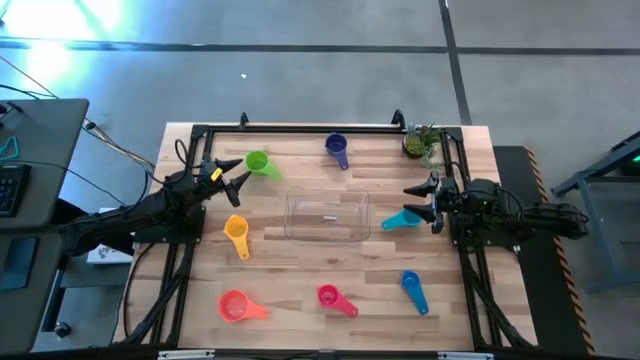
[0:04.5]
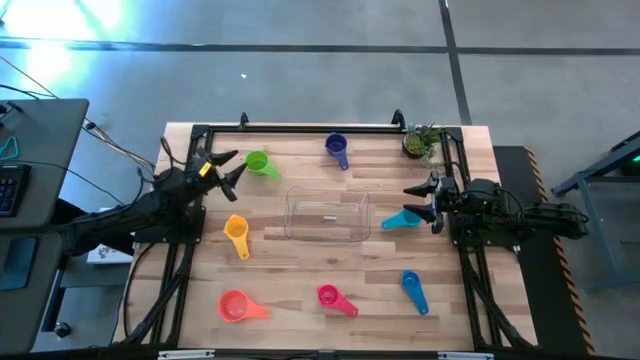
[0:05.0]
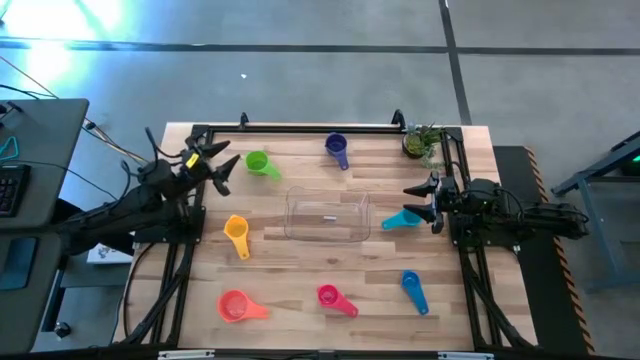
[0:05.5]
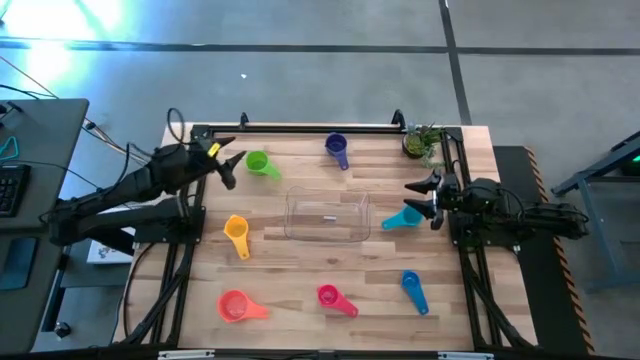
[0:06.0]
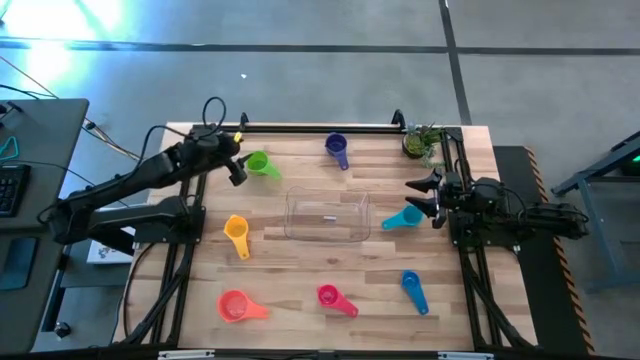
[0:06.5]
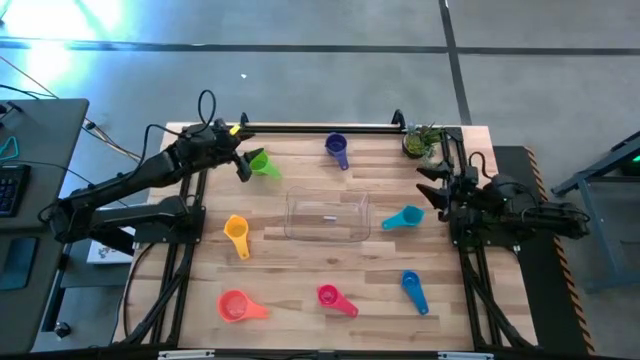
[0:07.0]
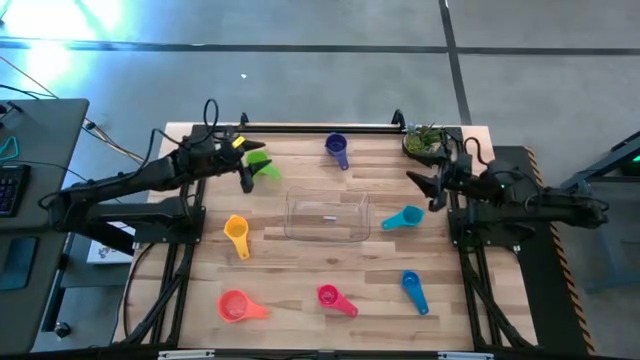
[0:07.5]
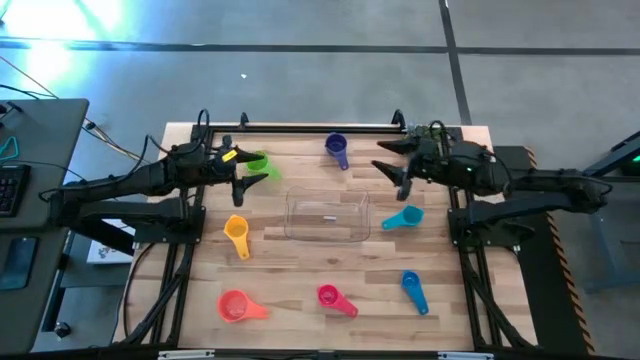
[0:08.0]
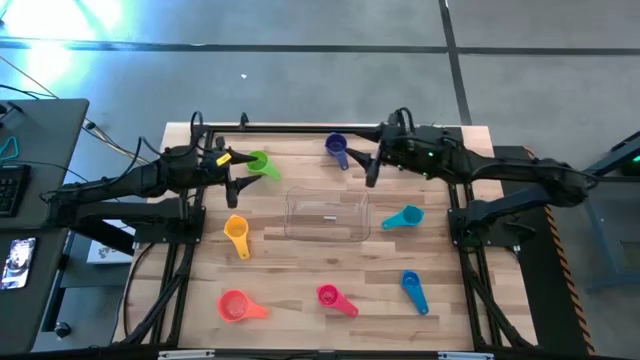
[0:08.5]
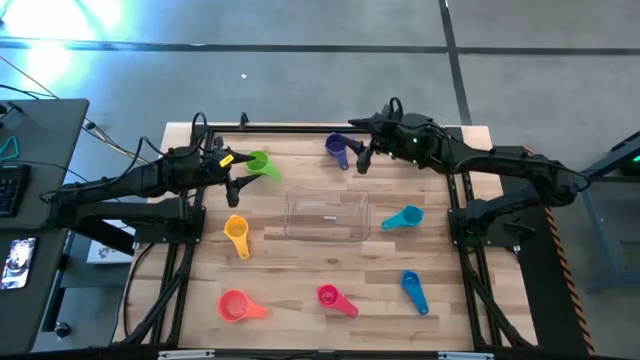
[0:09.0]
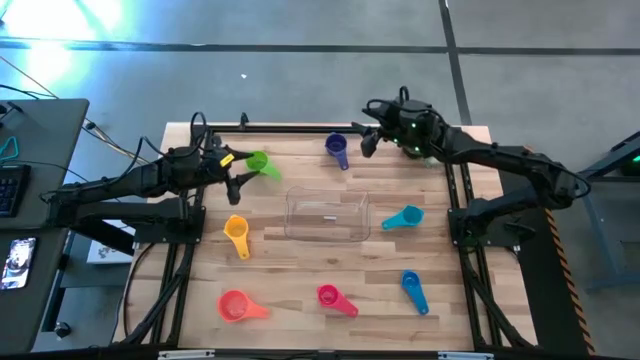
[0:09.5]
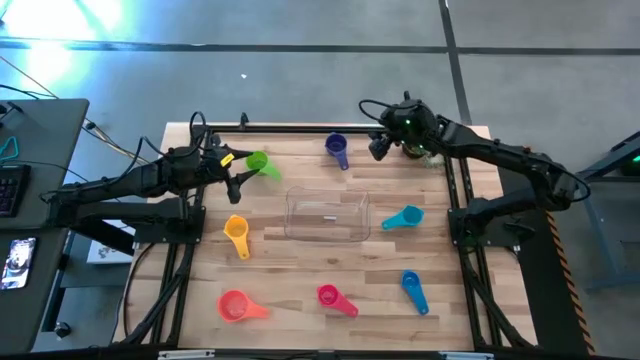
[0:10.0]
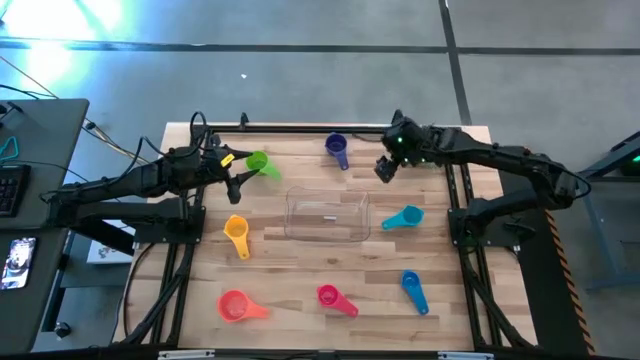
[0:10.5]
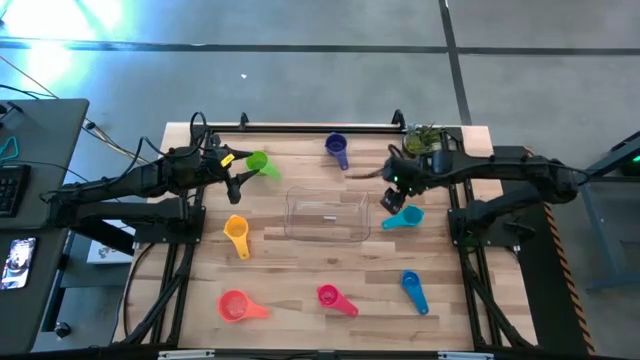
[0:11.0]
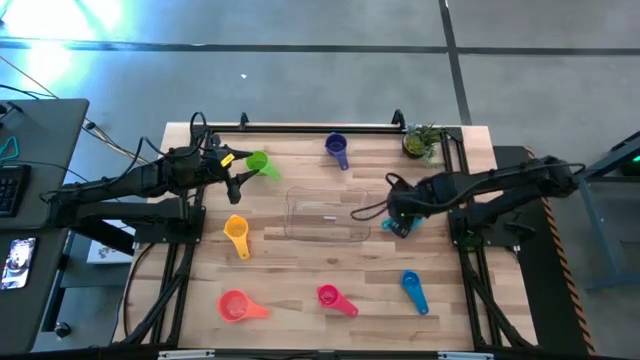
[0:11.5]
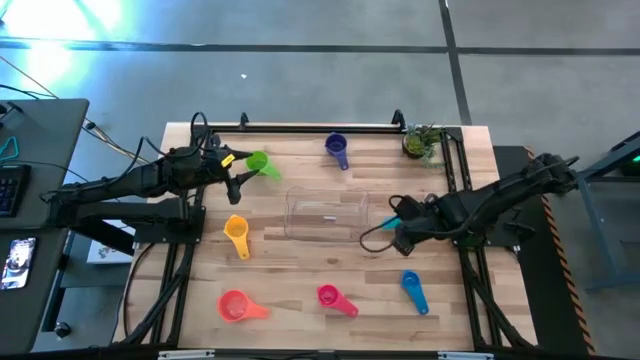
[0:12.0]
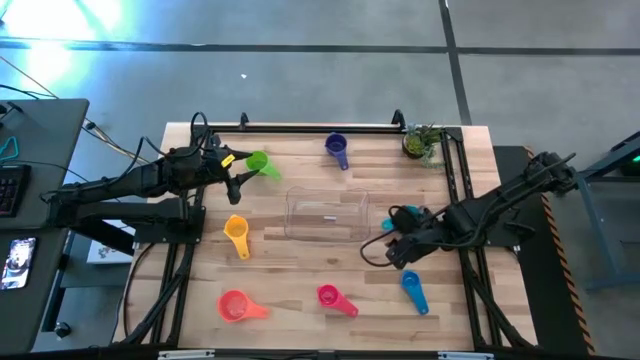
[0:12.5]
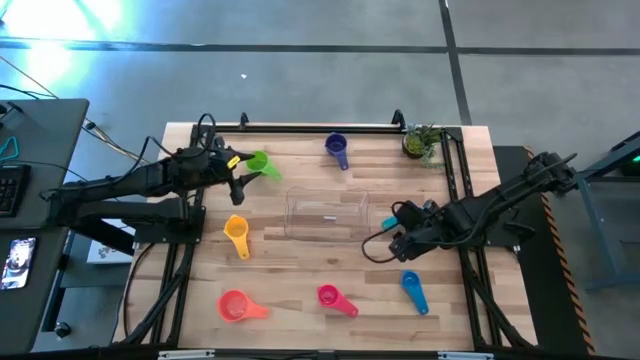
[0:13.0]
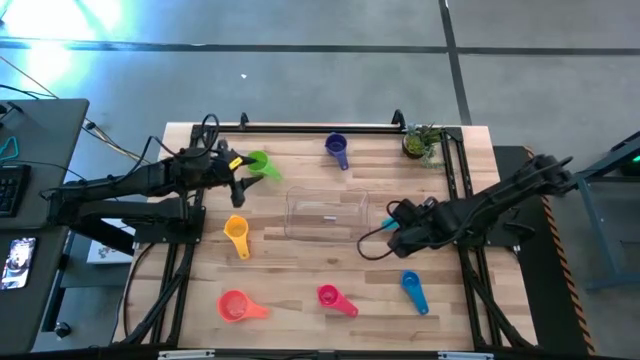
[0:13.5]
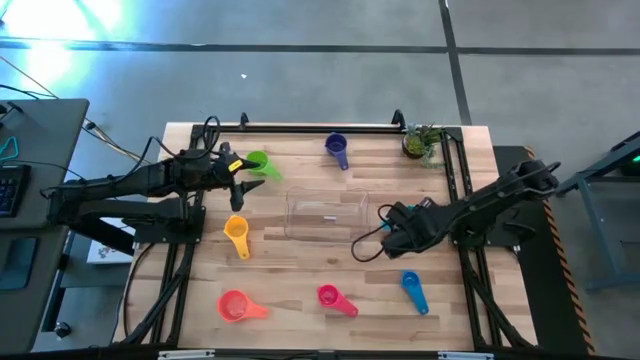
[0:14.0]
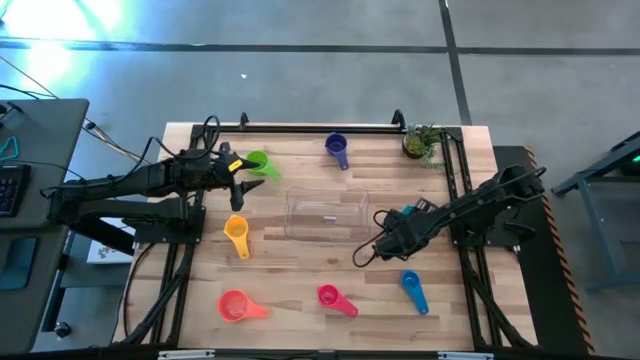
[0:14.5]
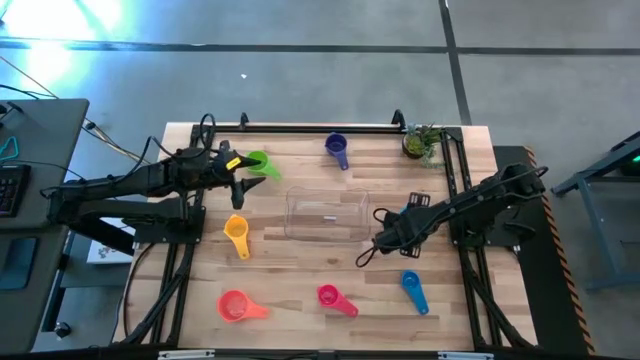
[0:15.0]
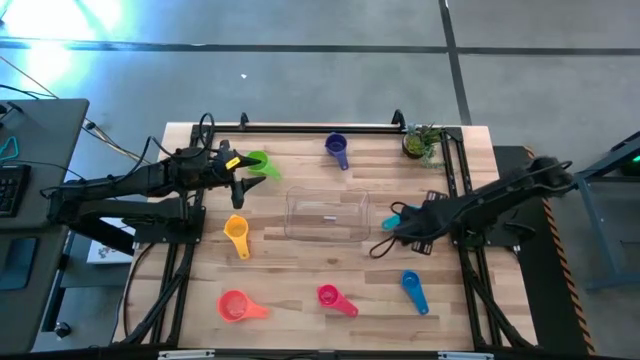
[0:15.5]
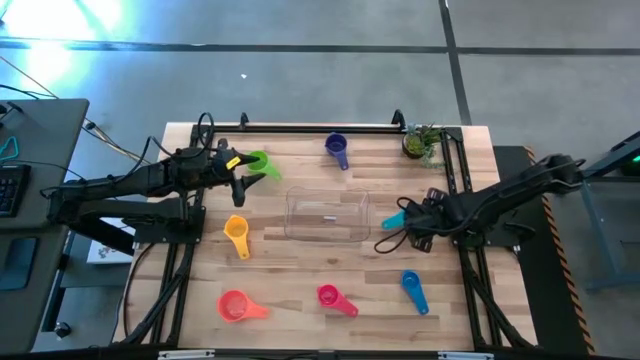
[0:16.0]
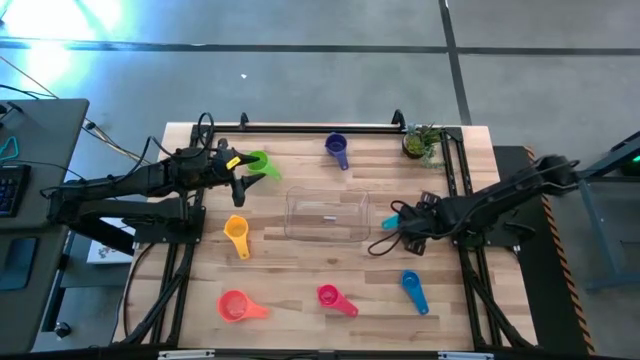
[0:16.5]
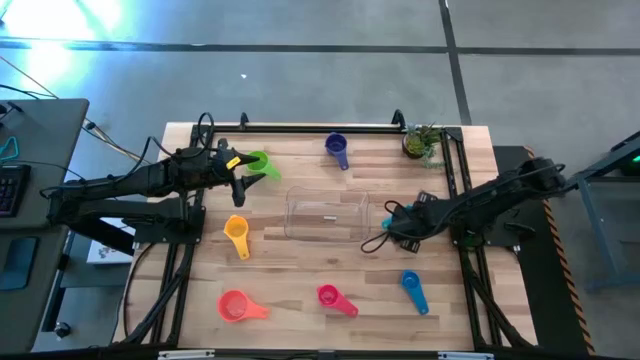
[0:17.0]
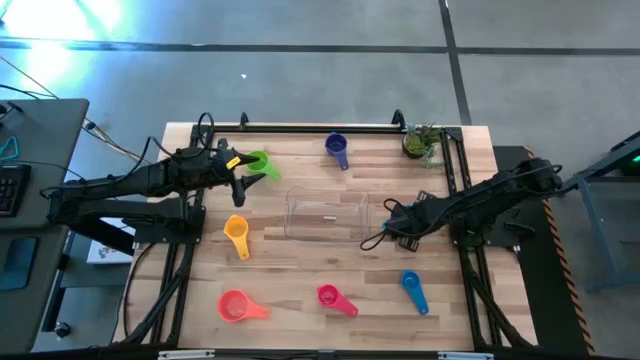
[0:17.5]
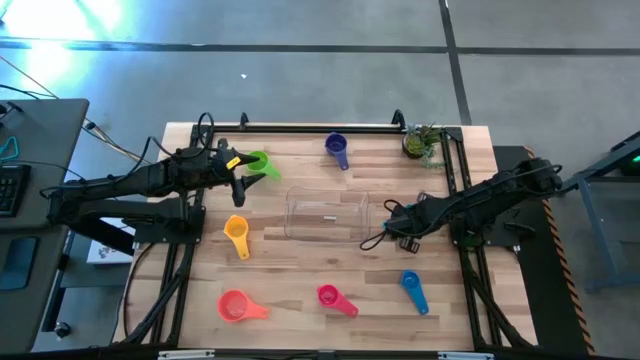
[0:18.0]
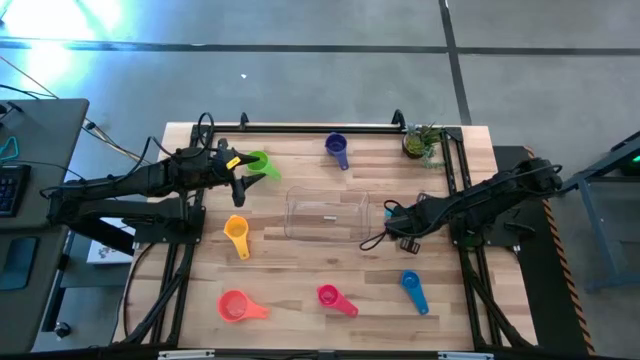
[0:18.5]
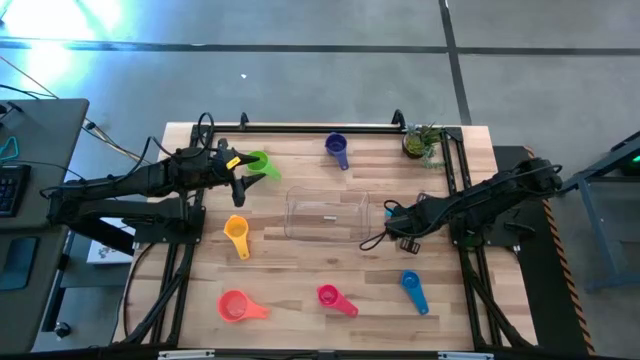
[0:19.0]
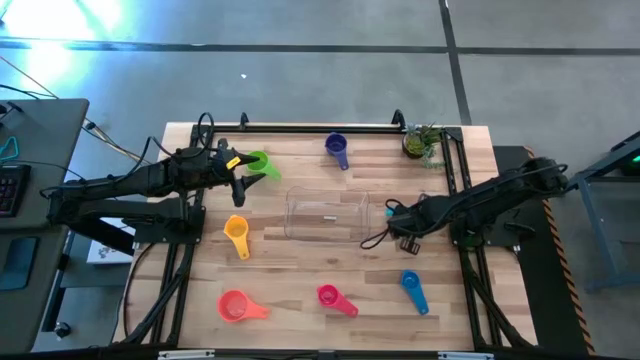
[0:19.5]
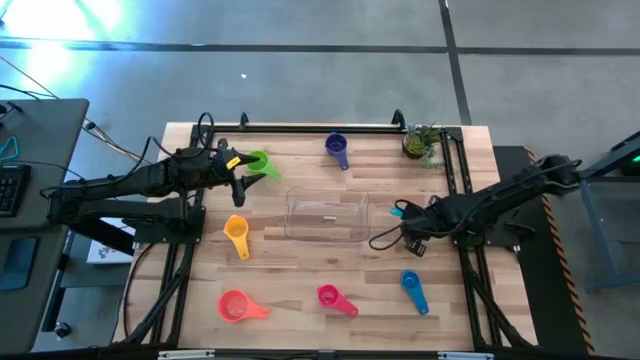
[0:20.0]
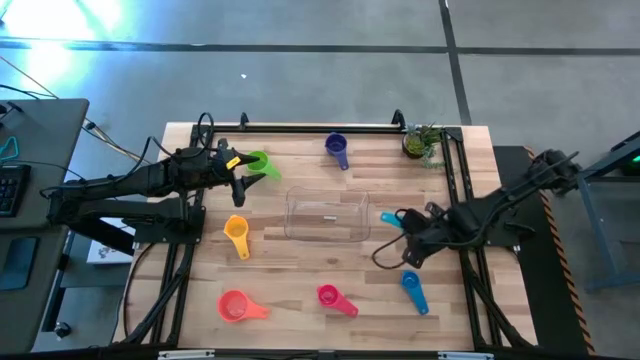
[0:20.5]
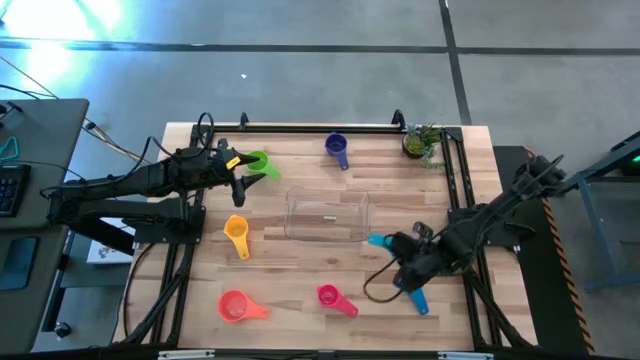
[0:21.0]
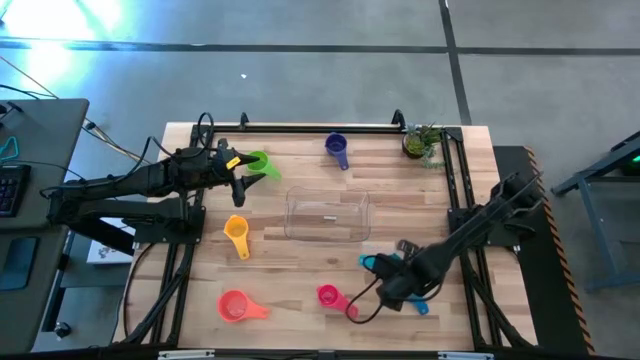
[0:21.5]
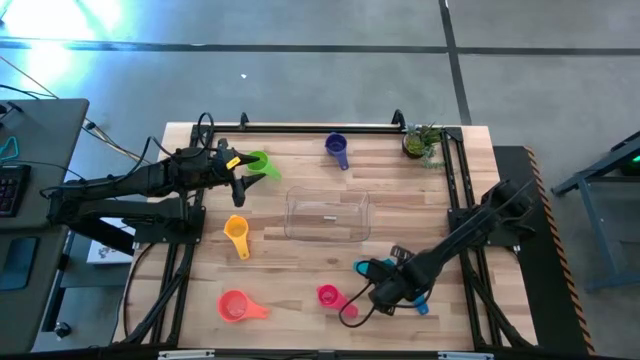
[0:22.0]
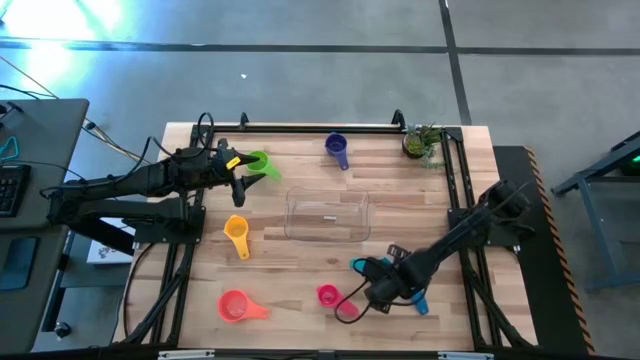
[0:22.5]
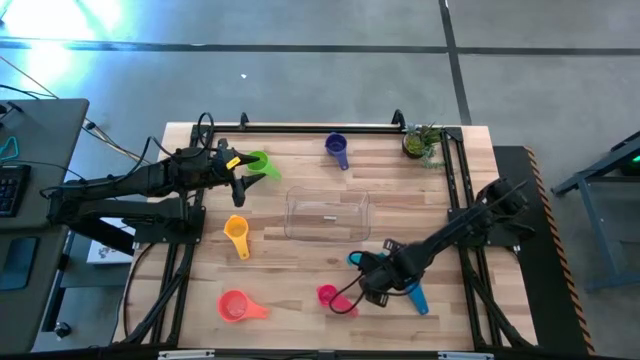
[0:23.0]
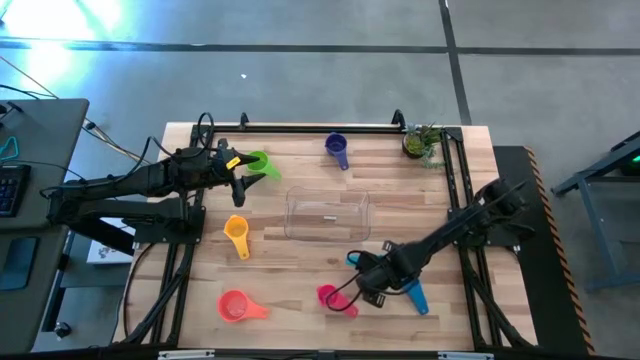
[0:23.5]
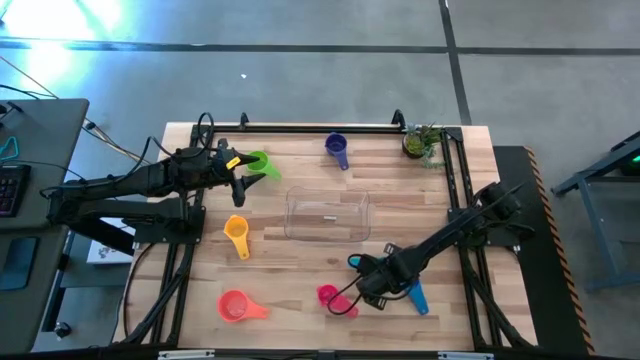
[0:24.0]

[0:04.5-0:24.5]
Task: Nest measuring cups in basket
Move the light blue measuring cup to the center of the table
